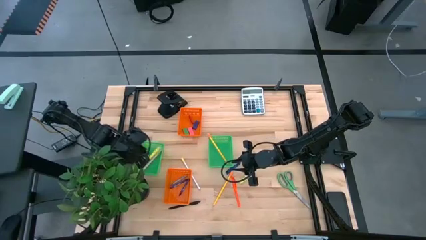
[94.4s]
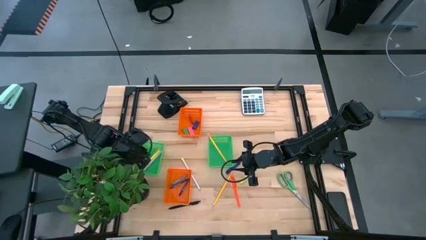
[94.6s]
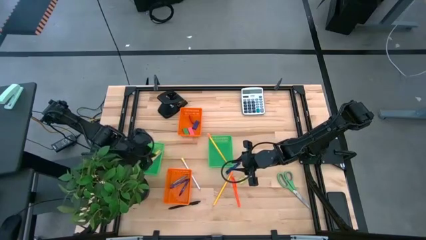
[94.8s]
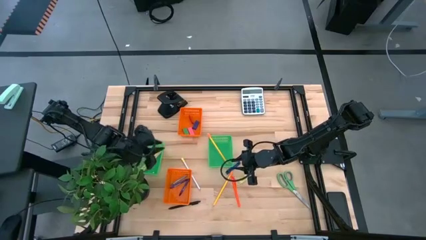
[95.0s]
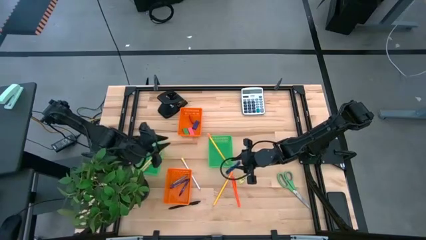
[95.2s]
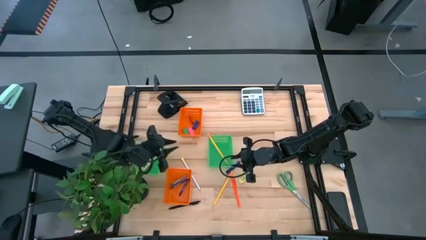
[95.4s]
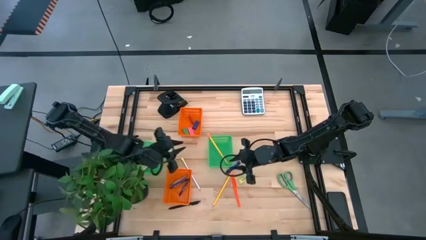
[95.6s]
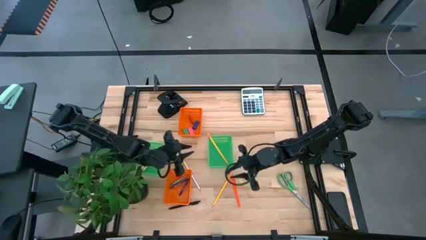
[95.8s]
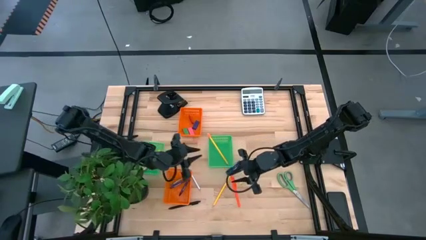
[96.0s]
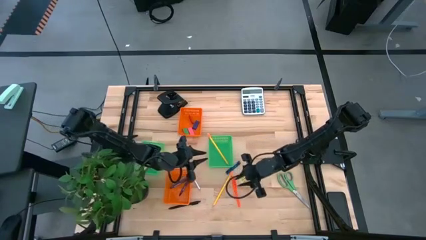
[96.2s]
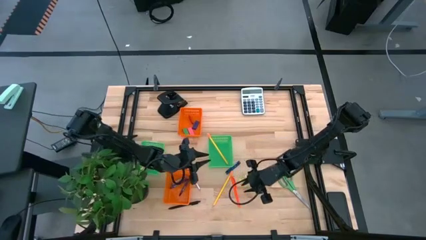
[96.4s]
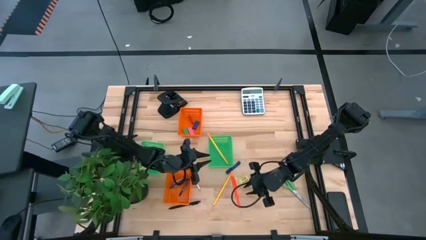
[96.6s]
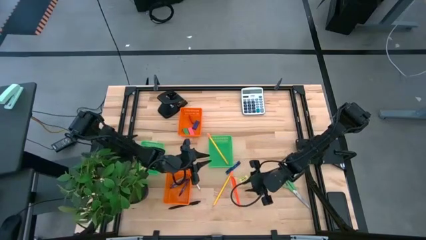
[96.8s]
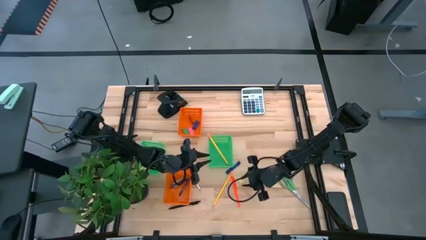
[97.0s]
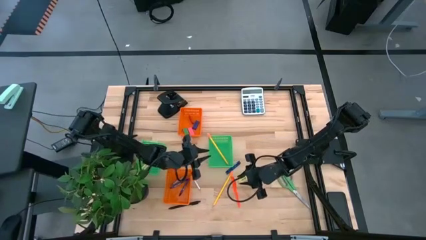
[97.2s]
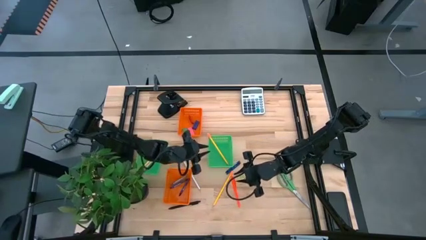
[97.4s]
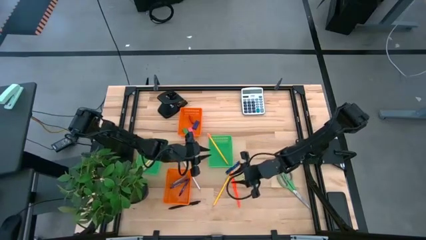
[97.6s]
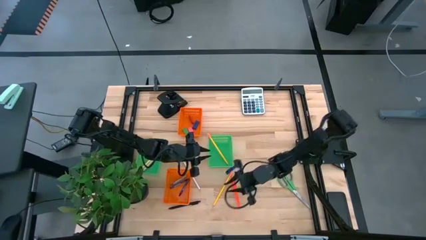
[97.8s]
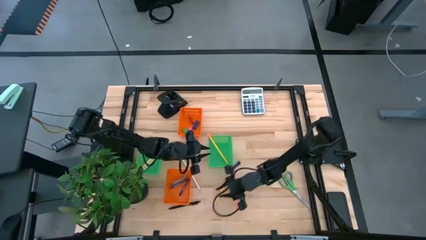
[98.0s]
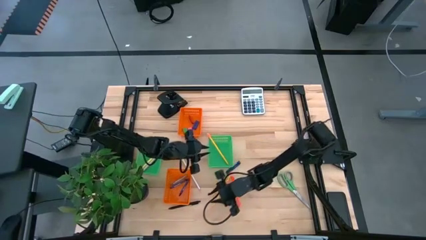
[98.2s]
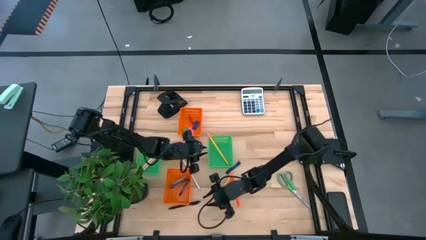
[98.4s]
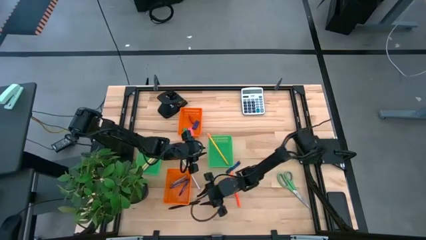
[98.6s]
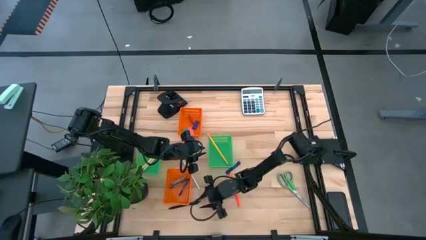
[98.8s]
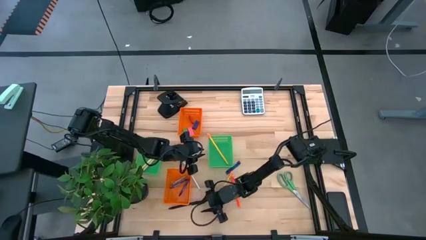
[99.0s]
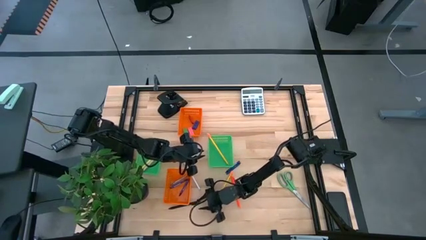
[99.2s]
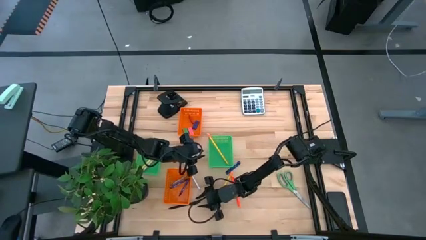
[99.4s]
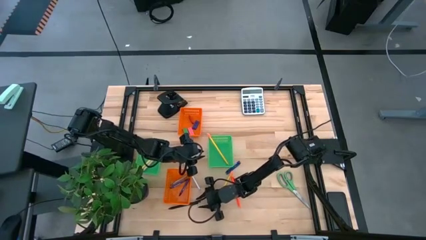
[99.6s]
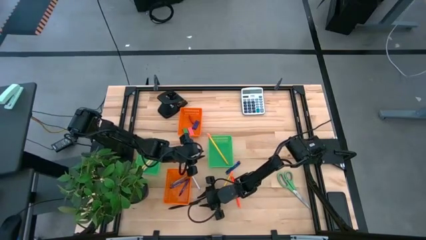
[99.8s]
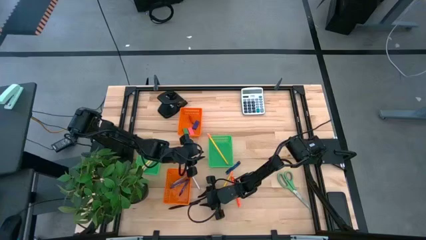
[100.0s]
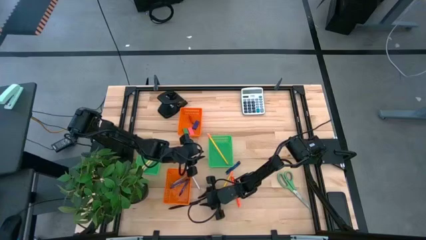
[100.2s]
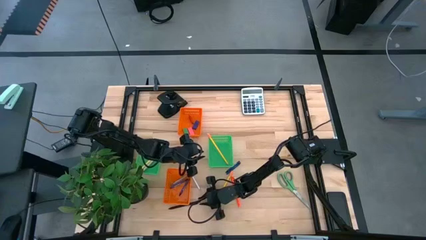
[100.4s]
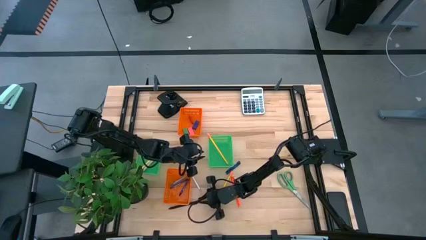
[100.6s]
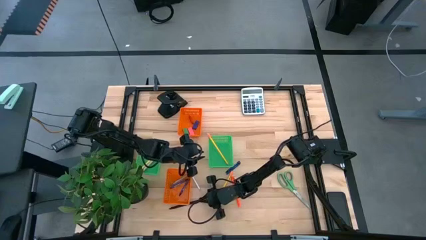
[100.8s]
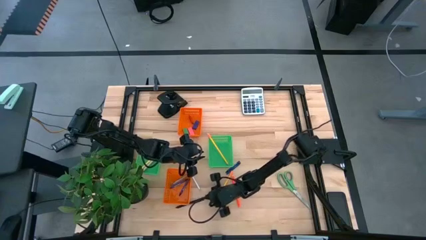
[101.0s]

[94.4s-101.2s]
Task: Sort crayons/erasers/pens/pencils in bins
Put the black pen into the left green basket

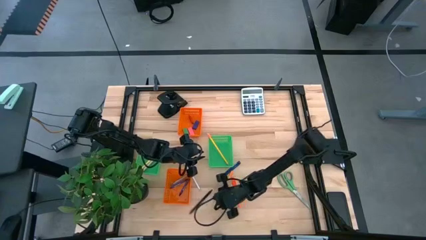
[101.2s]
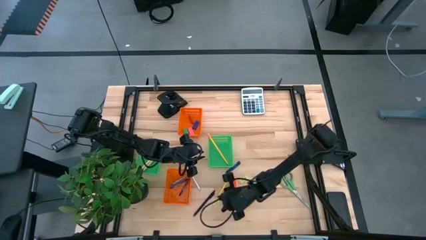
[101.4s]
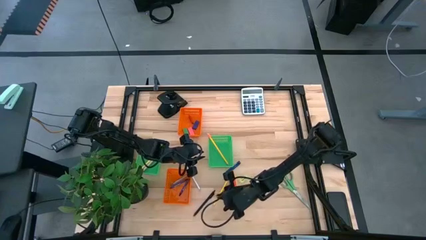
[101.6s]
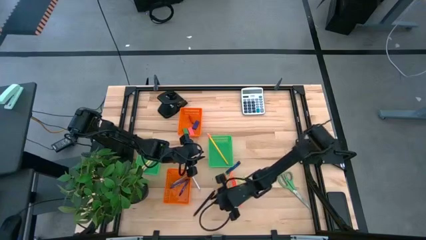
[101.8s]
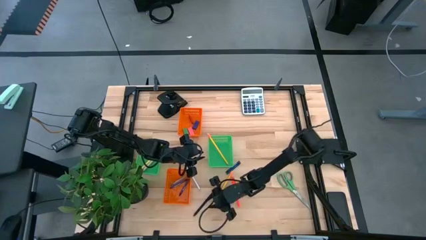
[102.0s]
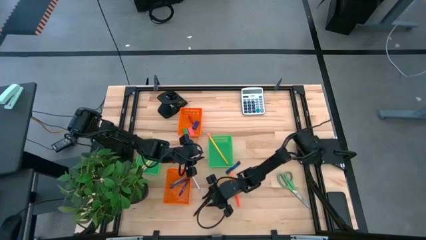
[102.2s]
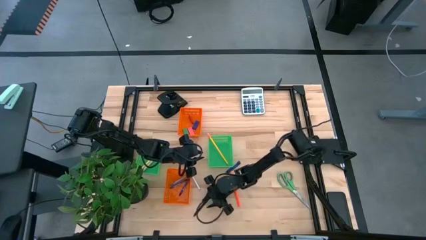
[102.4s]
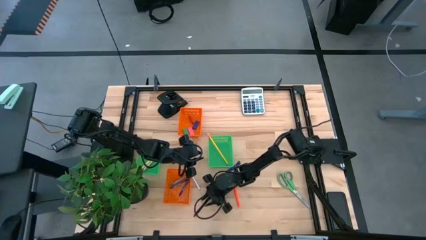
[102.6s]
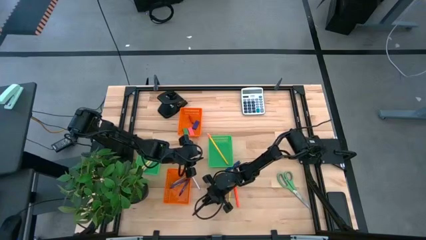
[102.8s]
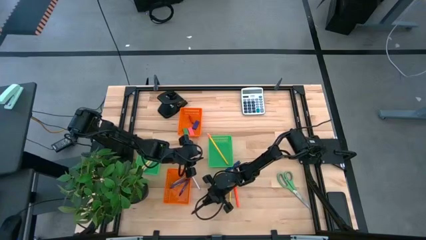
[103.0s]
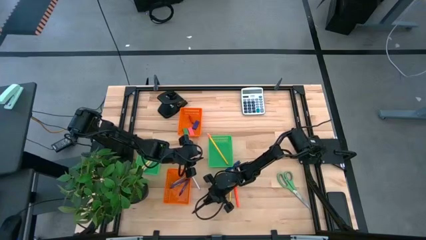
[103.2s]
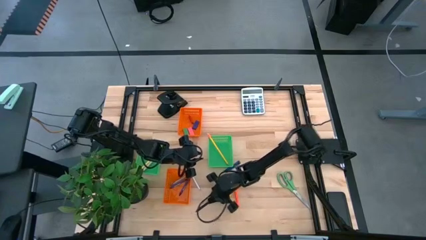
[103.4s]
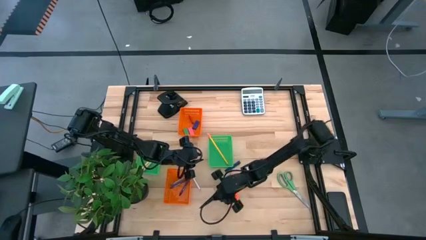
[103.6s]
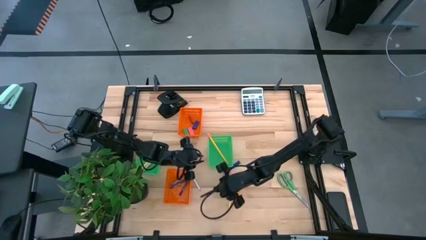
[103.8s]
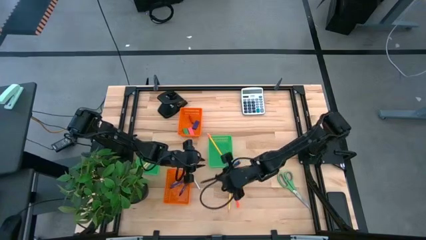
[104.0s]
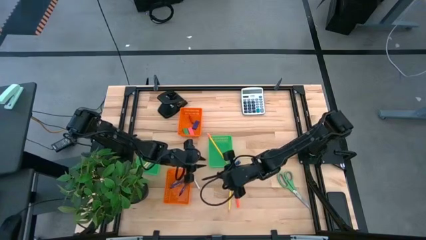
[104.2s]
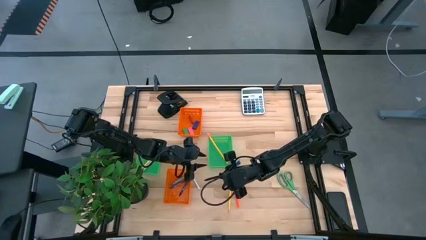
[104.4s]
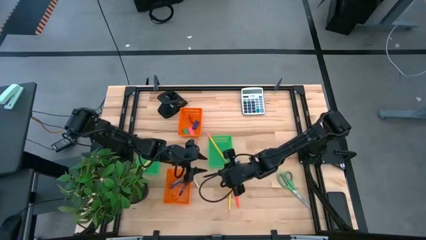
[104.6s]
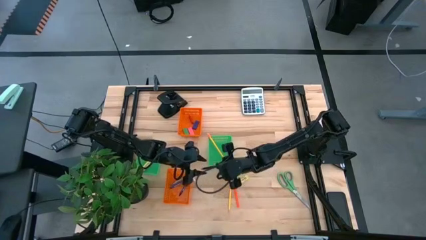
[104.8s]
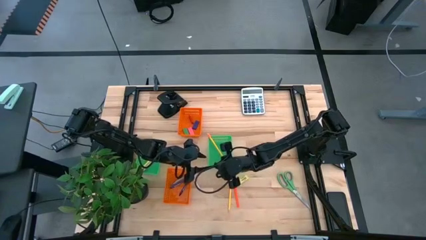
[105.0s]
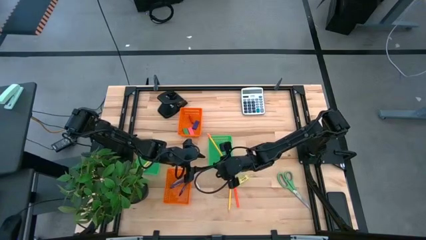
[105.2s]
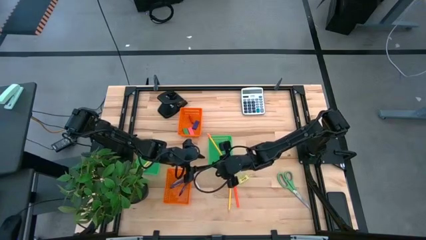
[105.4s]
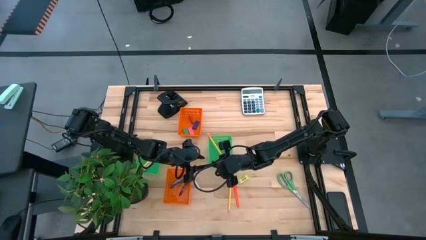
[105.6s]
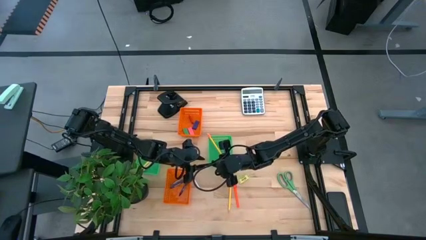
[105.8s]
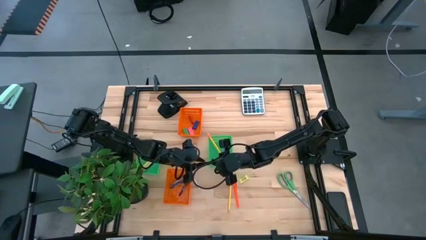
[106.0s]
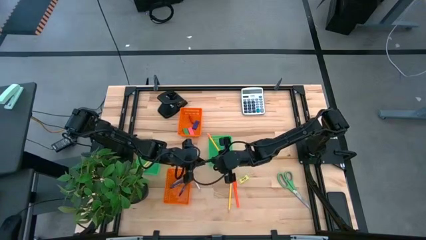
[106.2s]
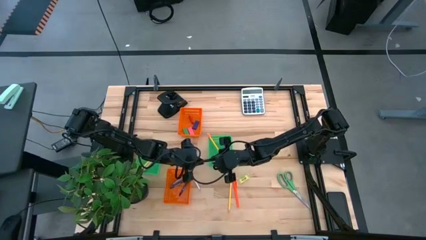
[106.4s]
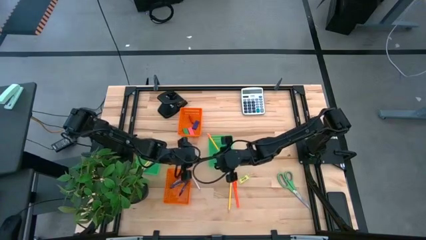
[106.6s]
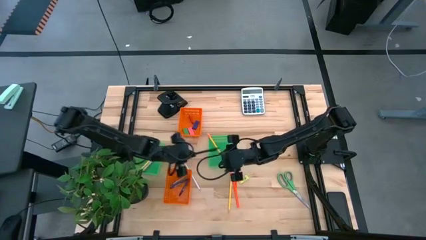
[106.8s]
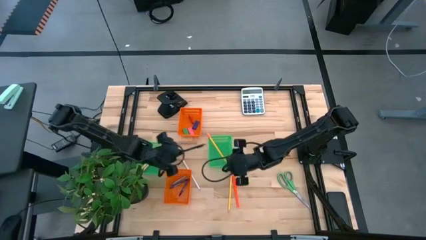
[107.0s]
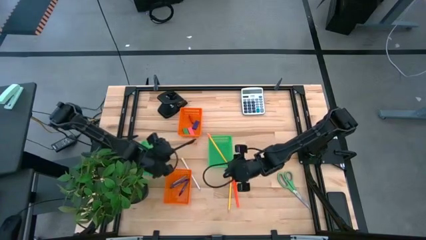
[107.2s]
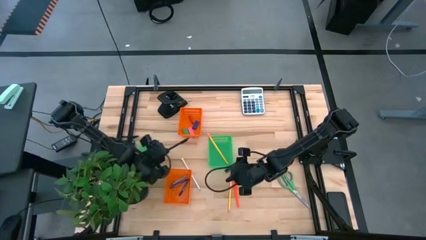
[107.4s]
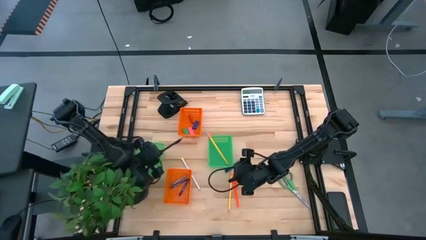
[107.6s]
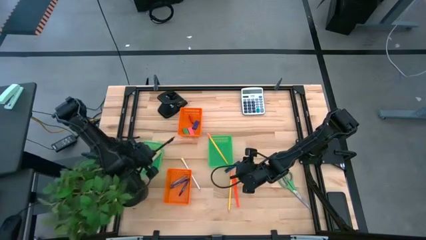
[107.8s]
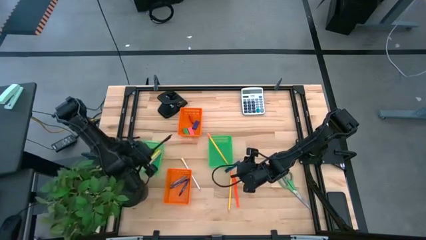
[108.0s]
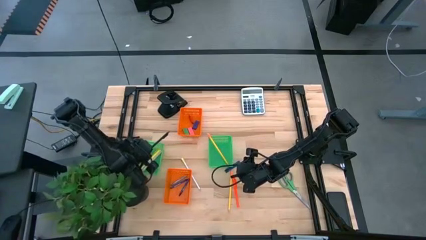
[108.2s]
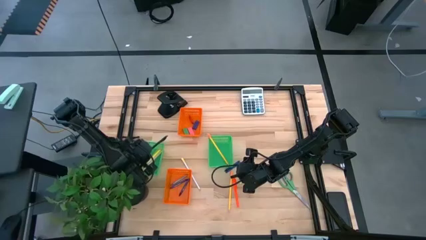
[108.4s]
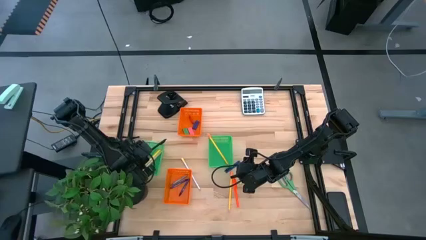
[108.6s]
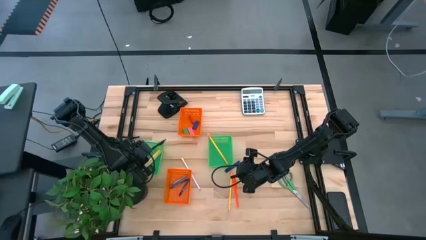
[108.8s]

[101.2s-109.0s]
Put the black pen into the left green basket

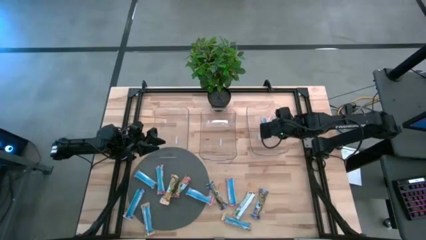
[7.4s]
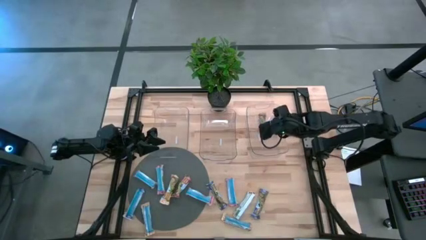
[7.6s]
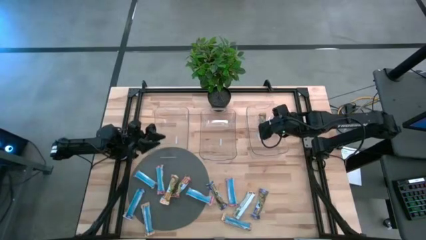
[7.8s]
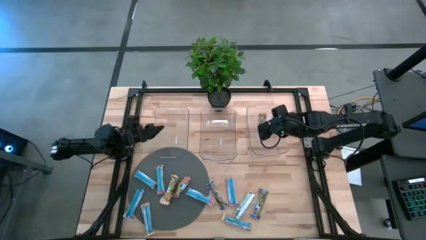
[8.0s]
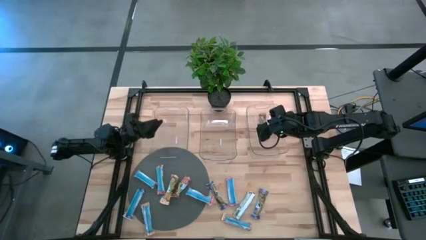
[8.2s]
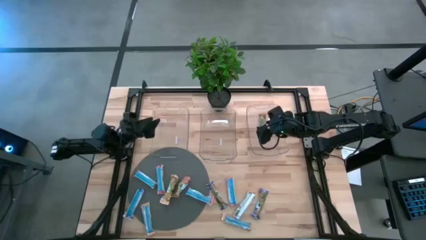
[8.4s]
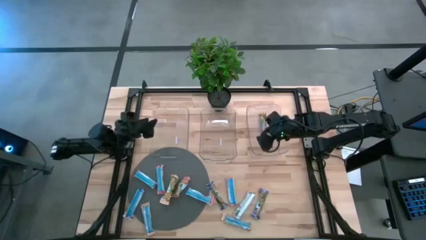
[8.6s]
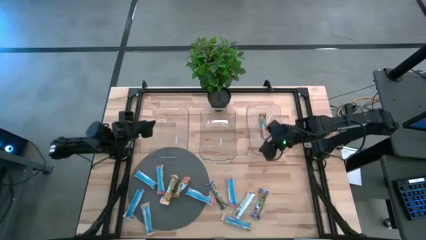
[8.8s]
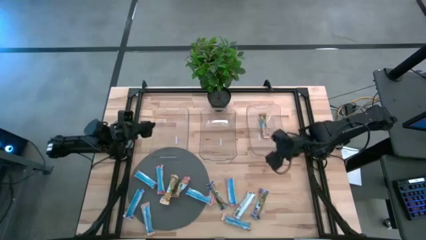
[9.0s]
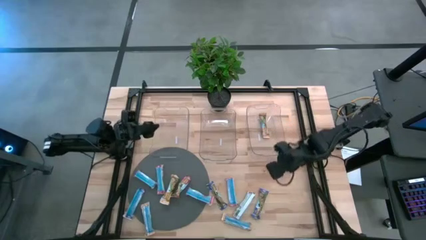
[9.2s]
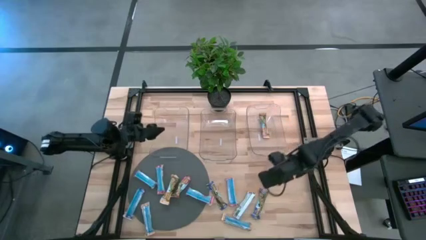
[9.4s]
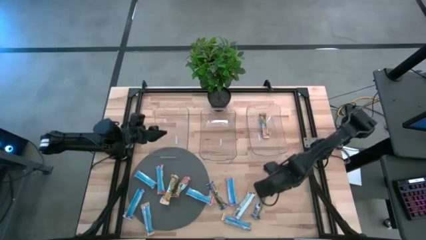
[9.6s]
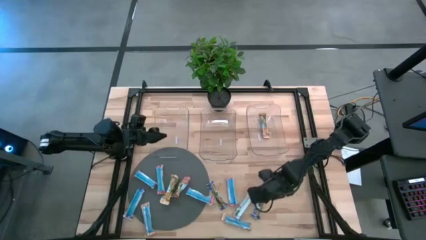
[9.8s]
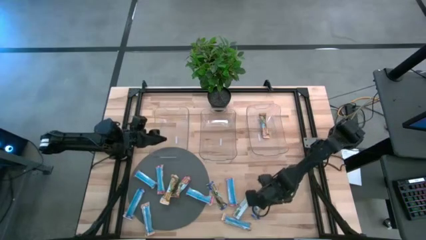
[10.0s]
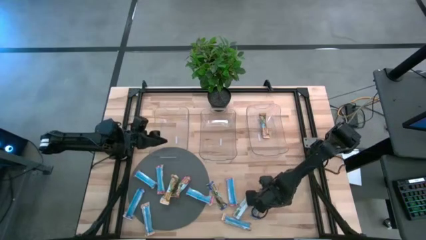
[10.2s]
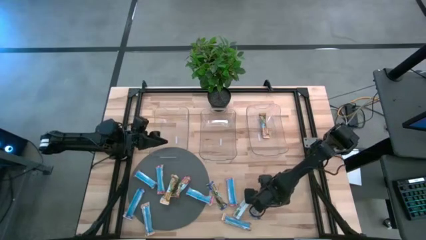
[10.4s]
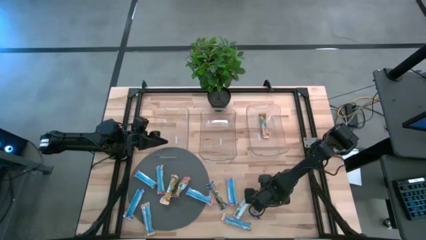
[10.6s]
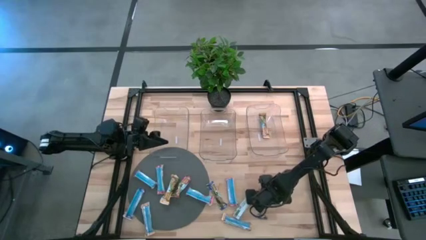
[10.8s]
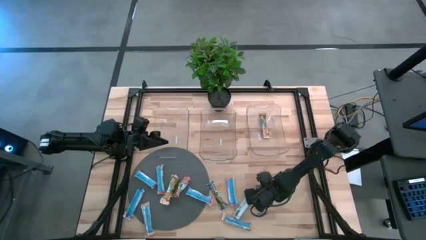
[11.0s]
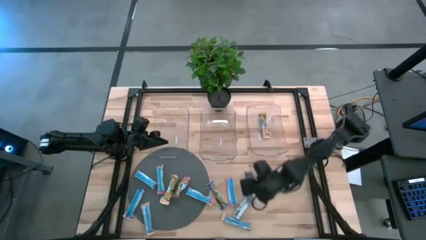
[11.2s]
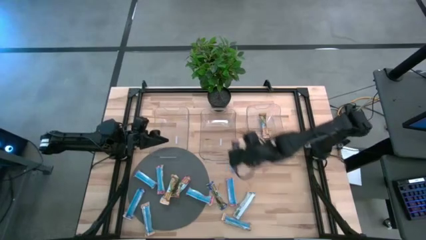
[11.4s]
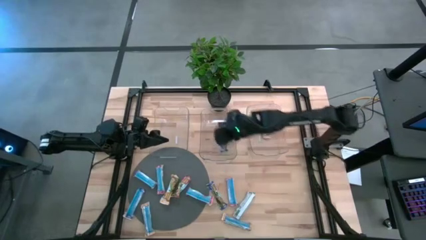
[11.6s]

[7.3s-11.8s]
Task: Pick and place Granola Bars by type
Put the blue granola bar into the middle transparent bin
